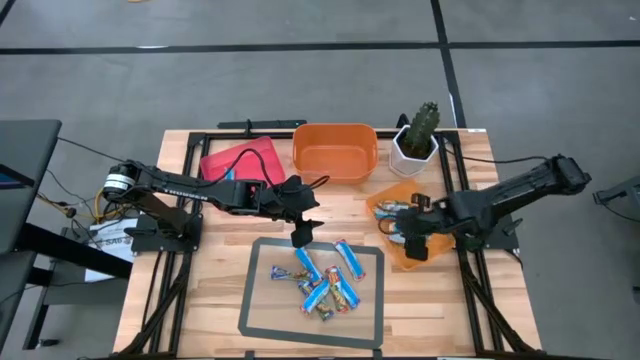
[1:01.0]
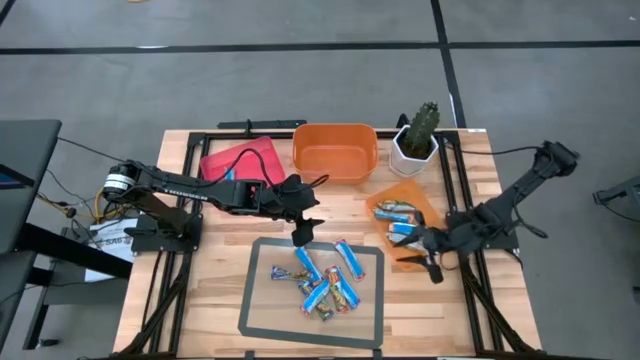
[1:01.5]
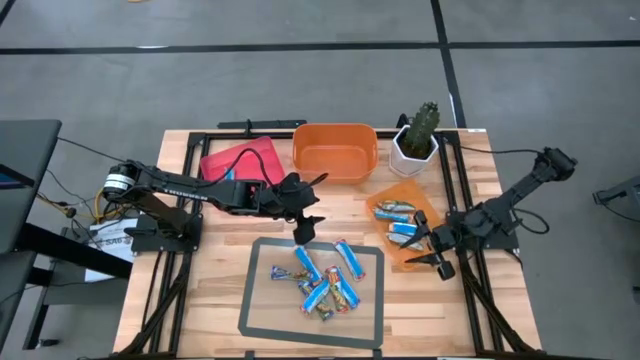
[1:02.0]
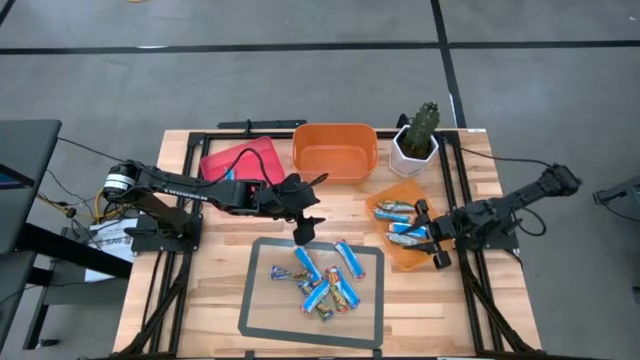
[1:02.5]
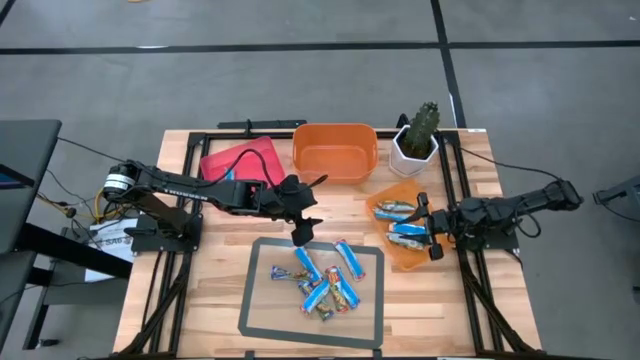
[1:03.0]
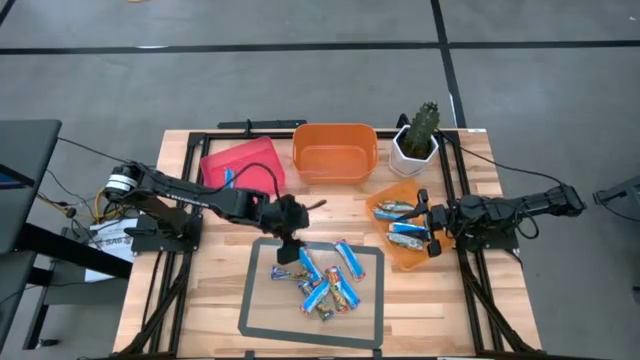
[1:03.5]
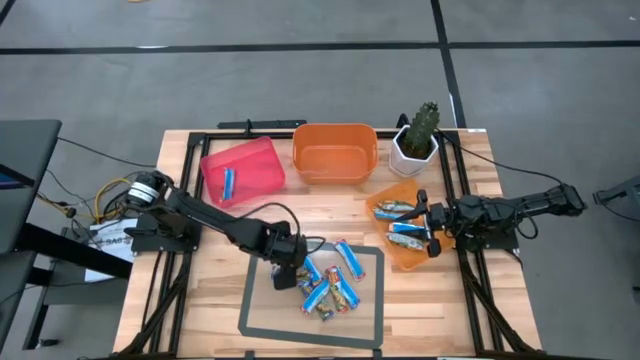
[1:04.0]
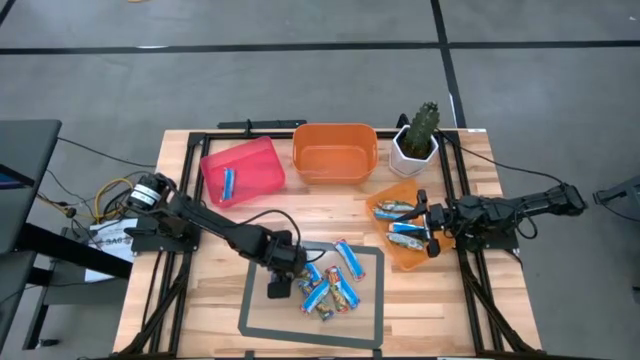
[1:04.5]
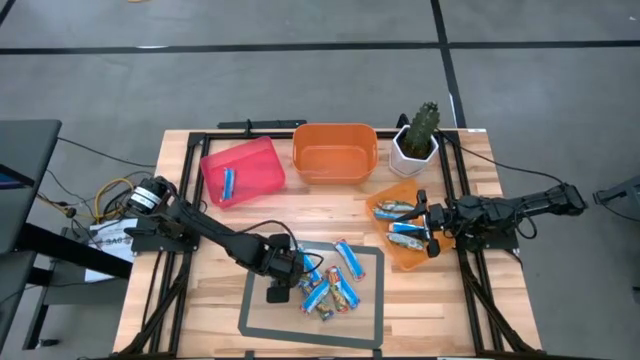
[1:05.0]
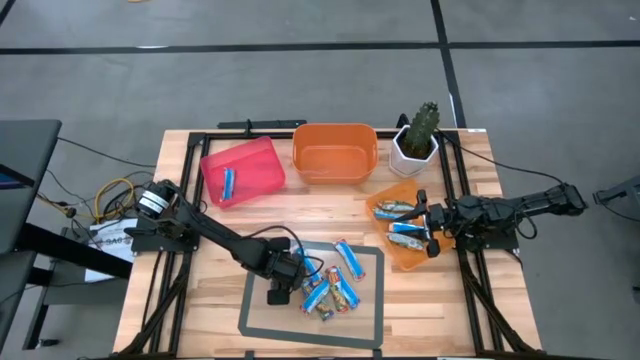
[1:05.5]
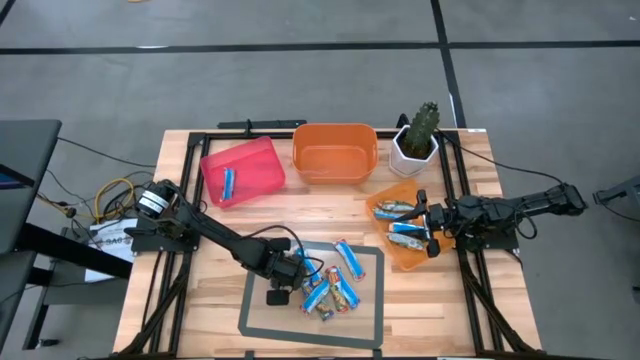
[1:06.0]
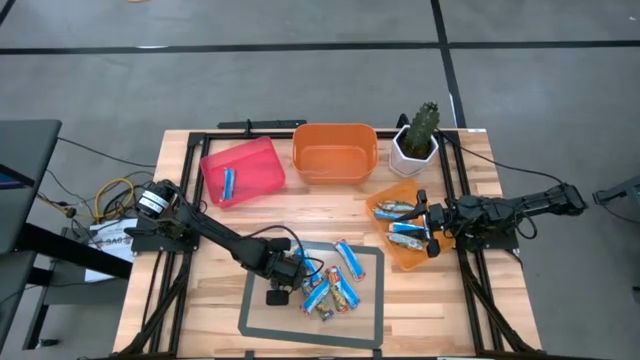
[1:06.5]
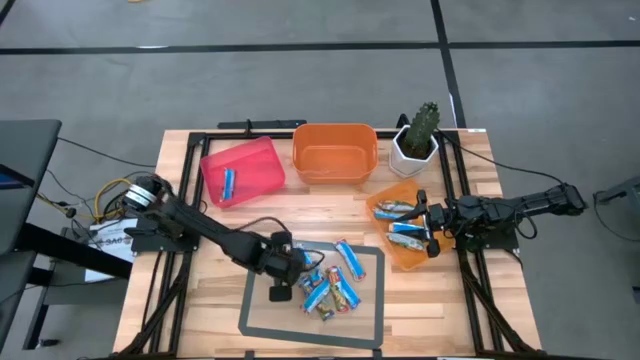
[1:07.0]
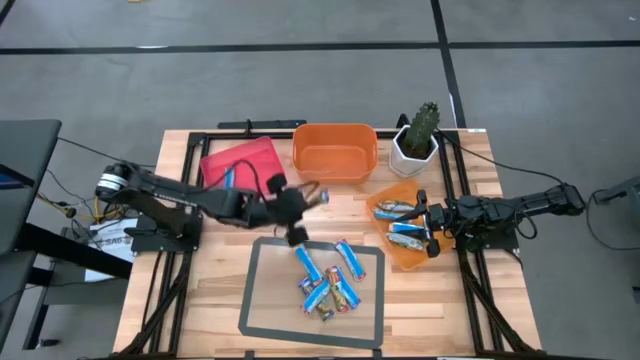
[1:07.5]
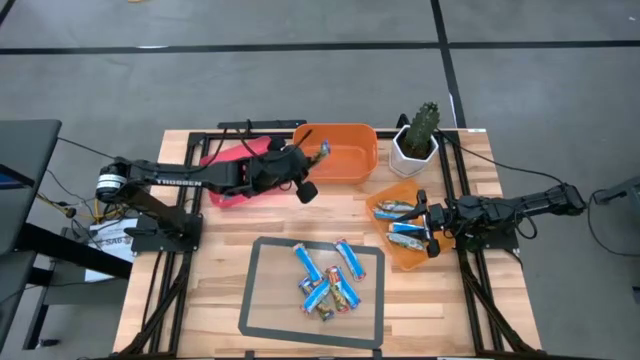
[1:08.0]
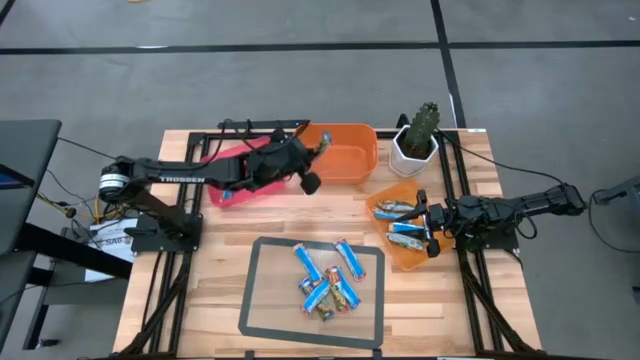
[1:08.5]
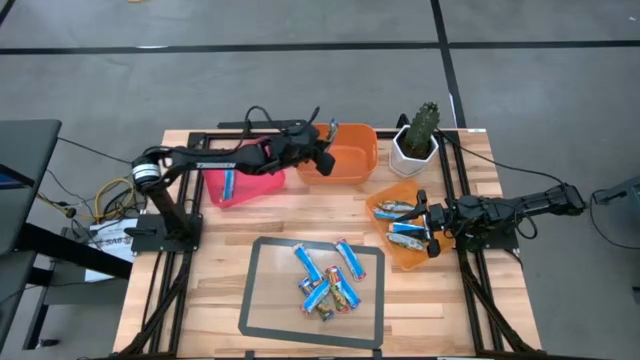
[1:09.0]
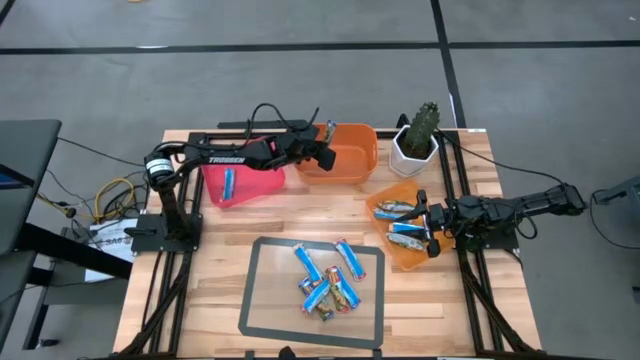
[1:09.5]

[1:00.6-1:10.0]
Task: Pick and place Granola Bars by type
Put the blue granola bar into the orange bin

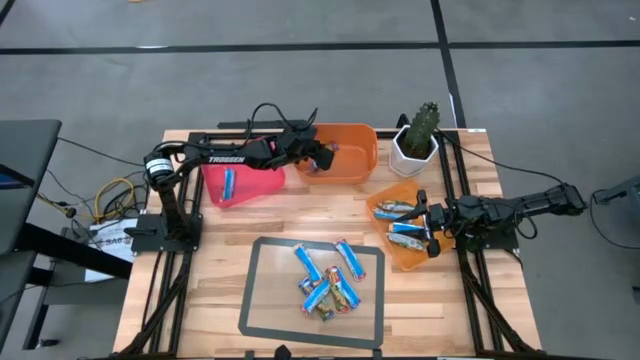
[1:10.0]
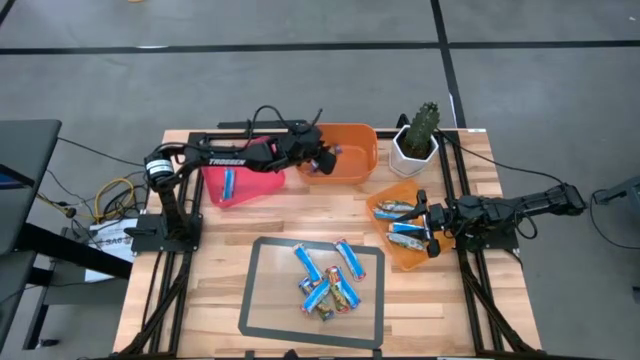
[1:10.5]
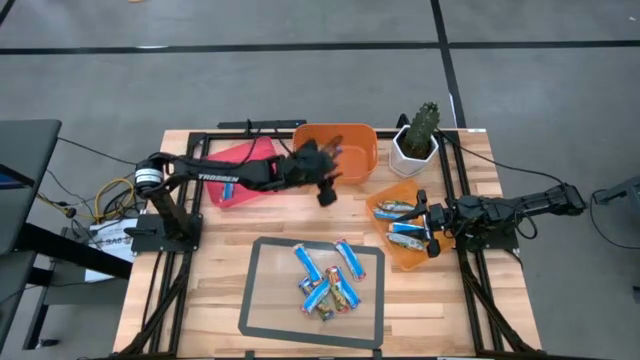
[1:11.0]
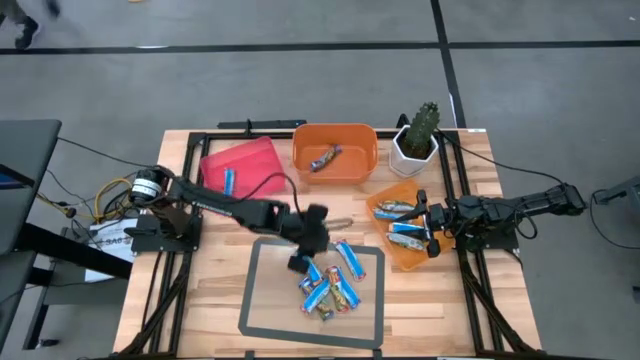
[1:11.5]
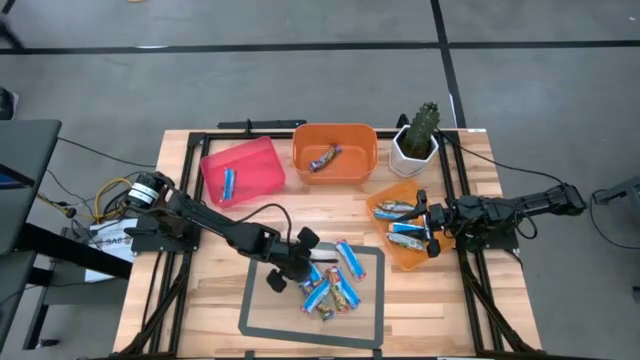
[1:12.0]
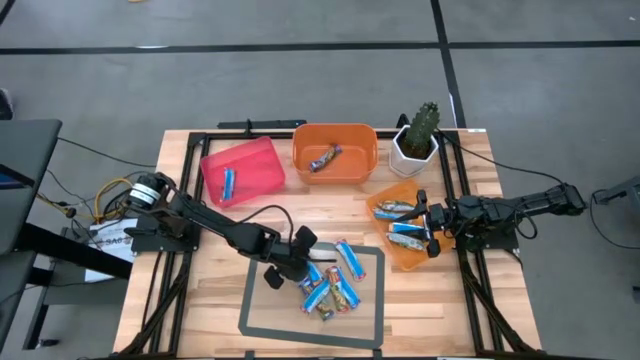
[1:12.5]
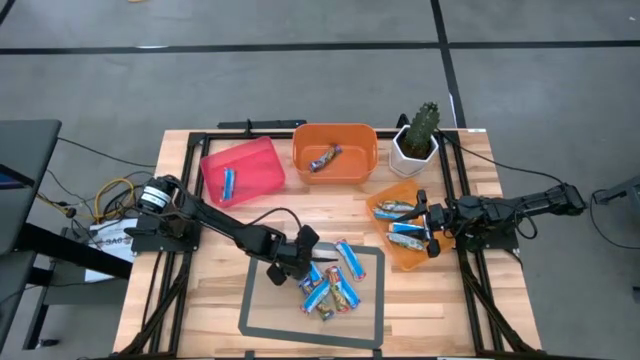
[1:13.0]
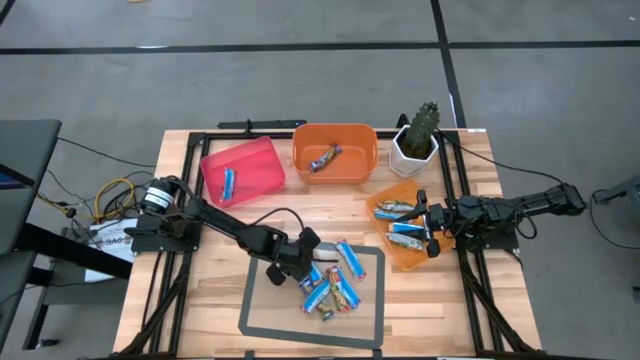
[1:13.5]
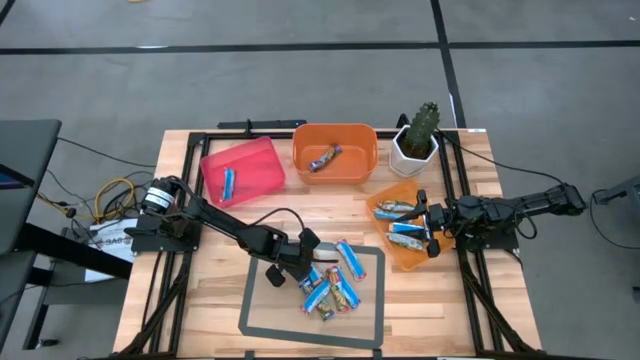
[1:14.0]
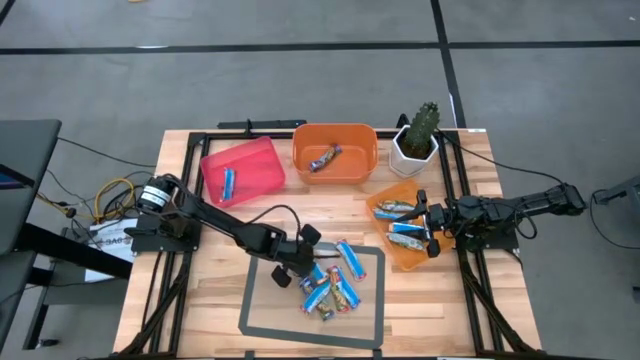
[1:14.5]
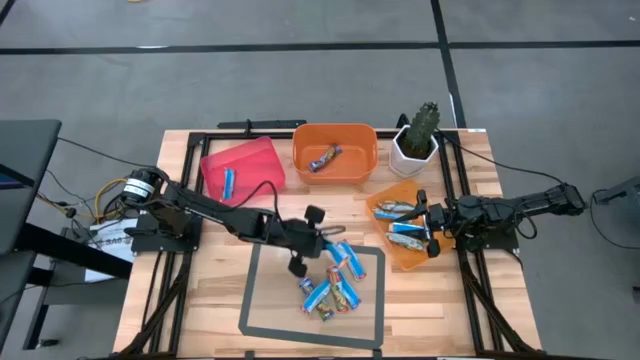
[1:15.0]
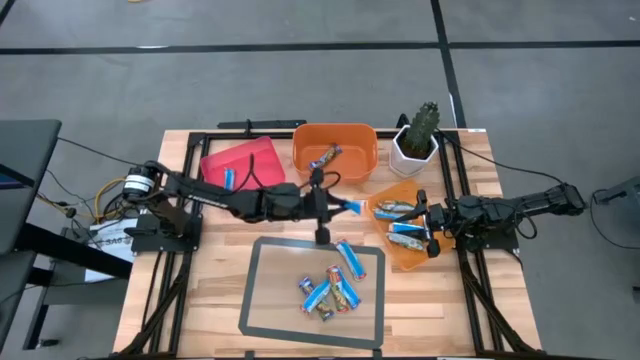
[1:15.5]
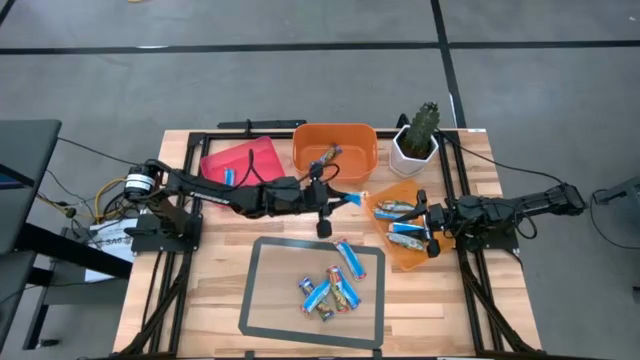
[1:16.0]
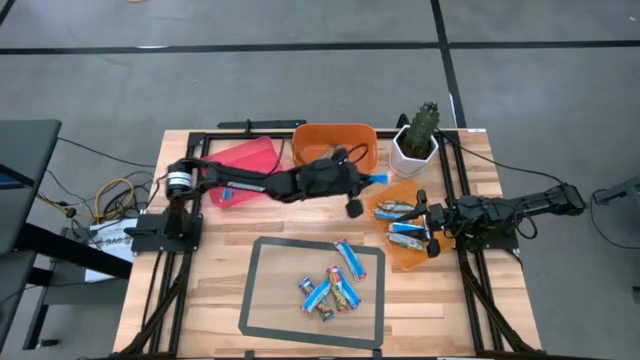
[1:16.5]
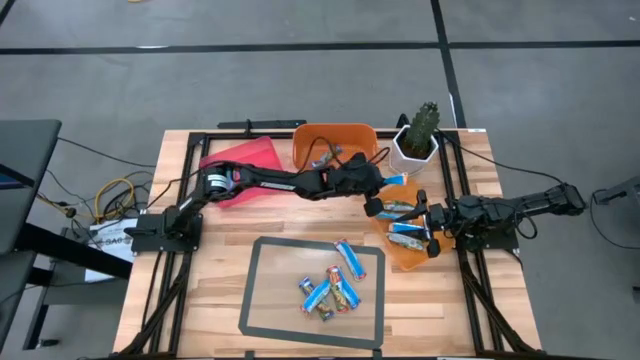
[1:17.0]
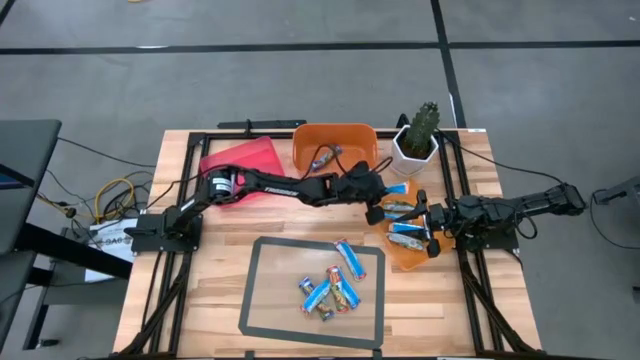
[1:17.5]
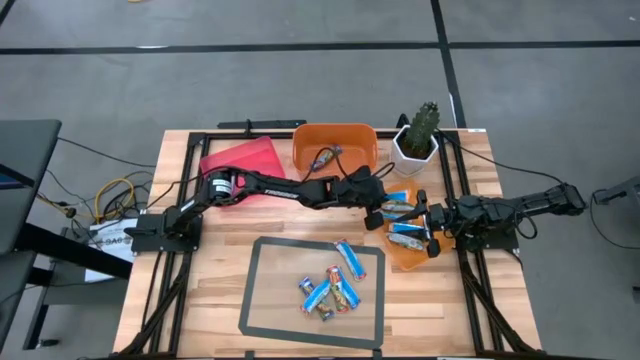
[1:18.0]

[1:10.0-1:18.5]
Put the orange granola bar into the light orange bin

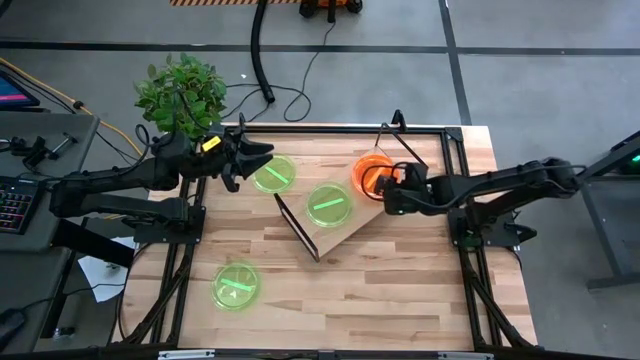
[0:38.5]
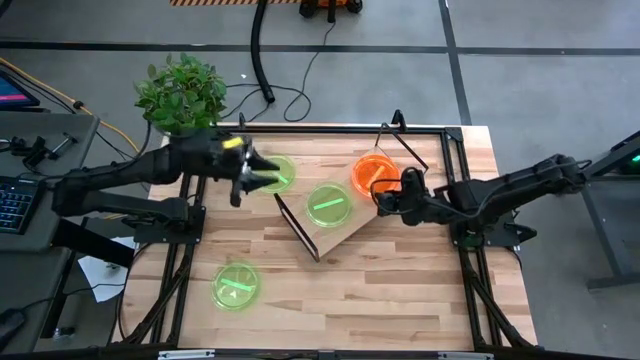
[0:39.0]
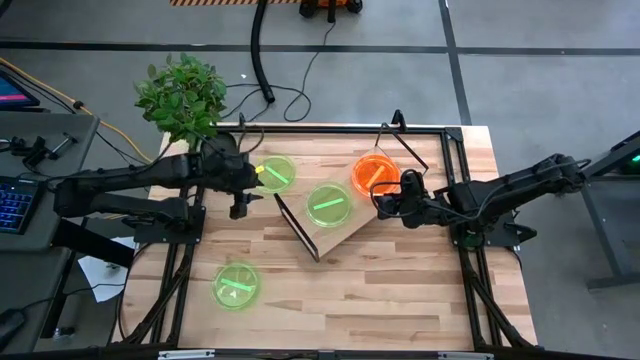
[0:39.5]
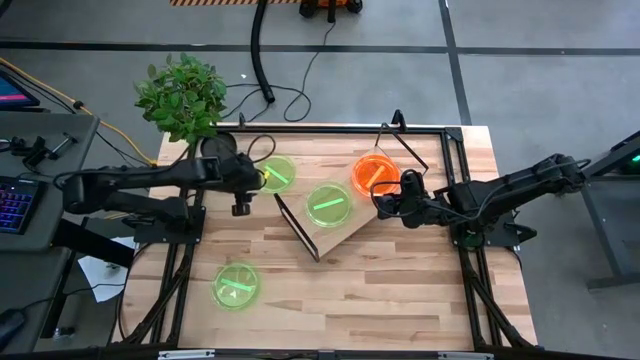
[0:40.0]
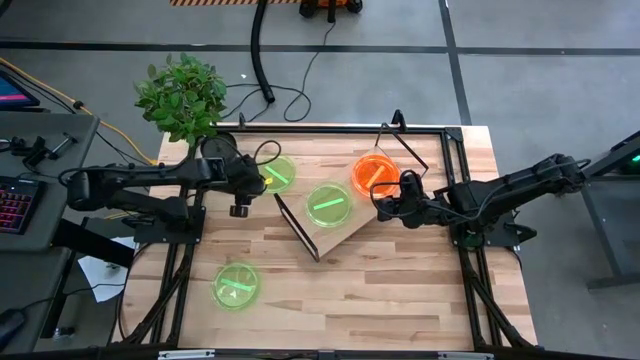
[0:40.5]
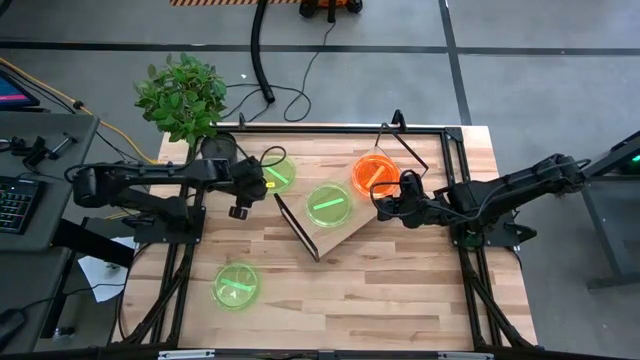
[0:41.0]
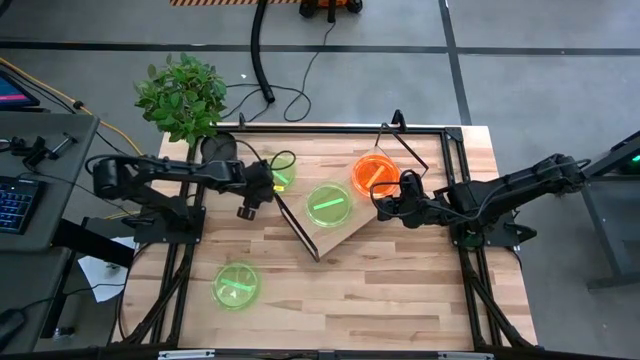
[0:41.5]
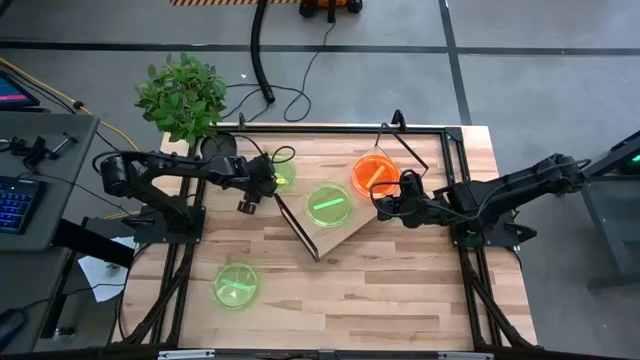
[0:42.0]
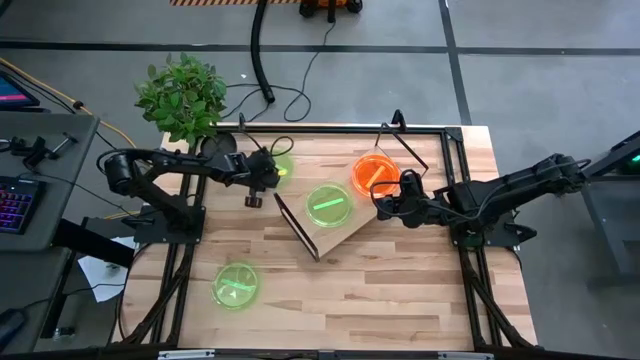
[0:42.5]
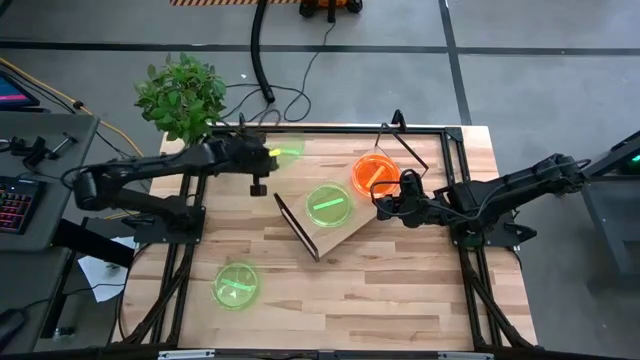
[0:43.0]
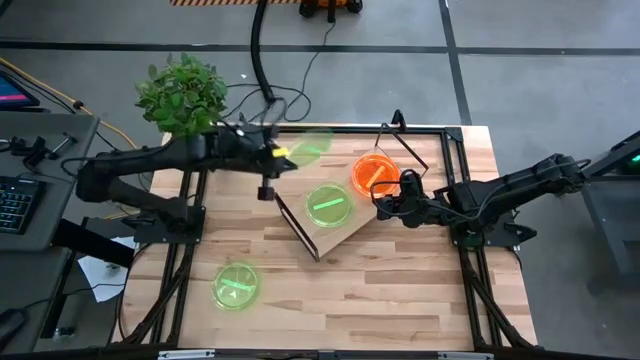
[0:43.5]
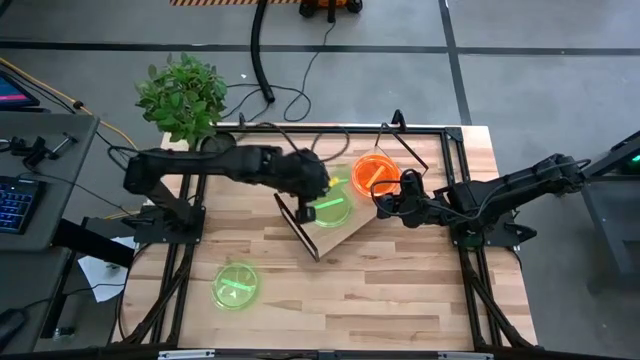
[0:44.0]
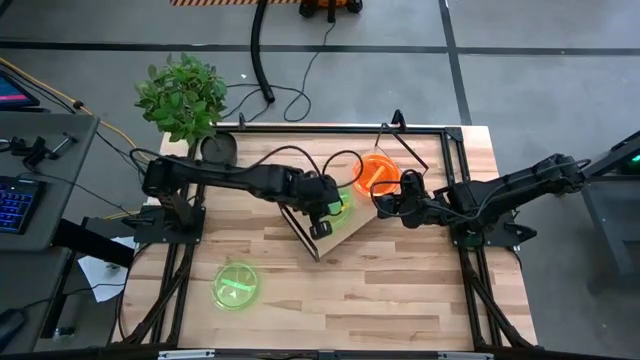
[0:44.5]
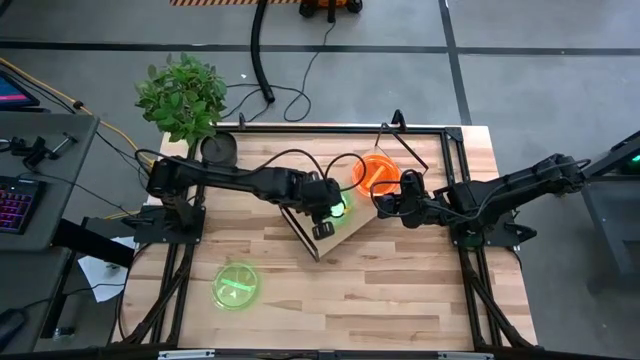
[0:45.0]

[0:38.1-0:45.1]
Task: Place and stack plates onto a shelf
Stack the top green plate on the top of the green plate on the shelf
